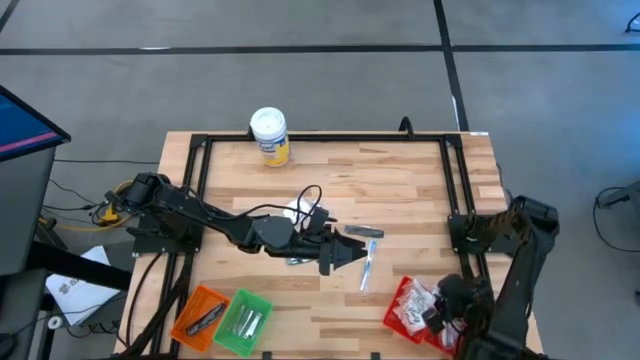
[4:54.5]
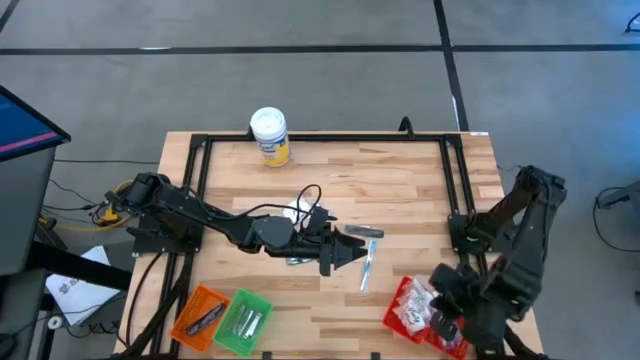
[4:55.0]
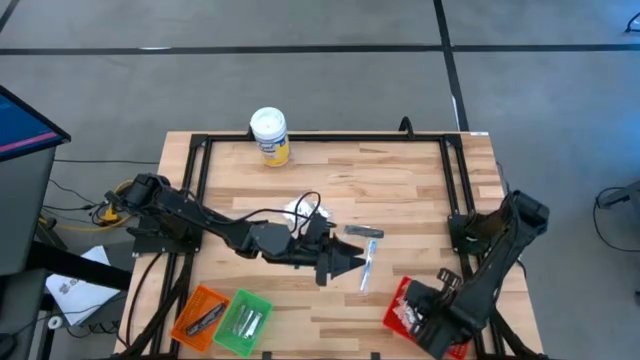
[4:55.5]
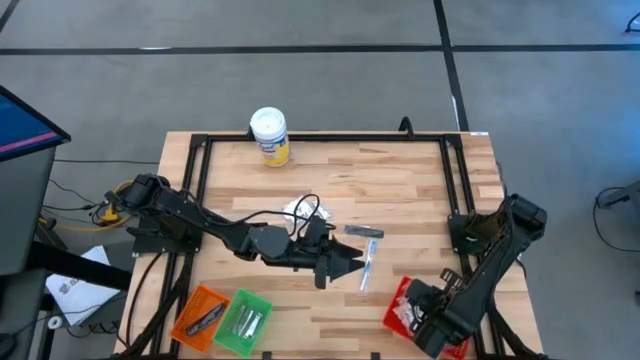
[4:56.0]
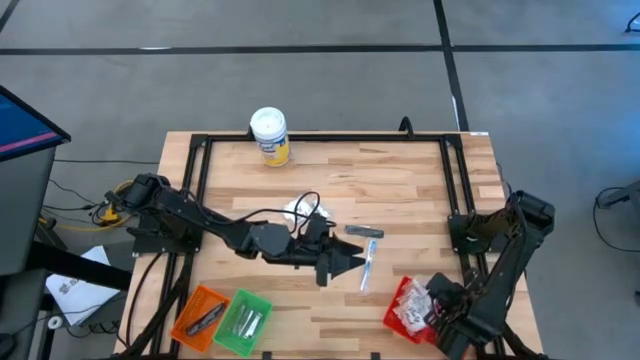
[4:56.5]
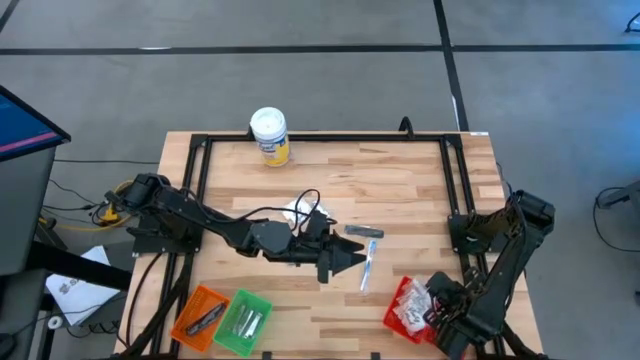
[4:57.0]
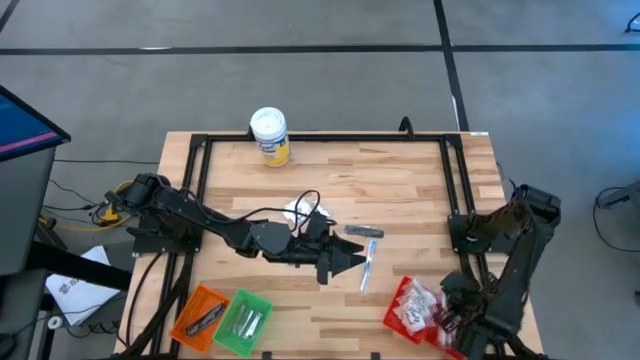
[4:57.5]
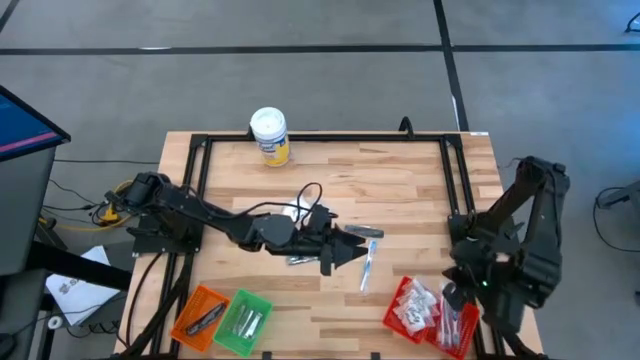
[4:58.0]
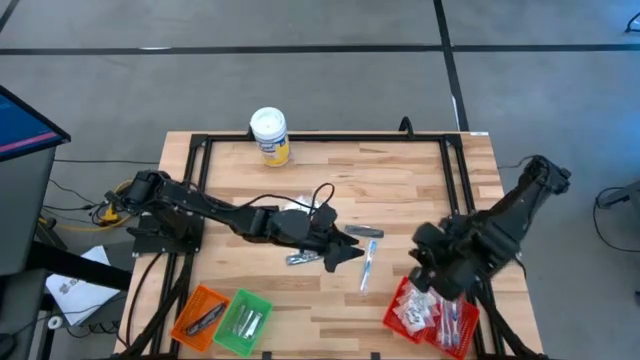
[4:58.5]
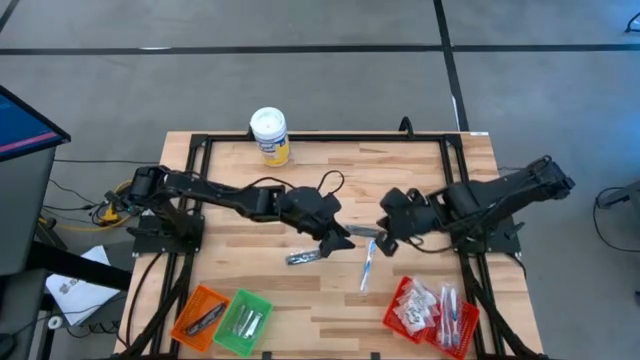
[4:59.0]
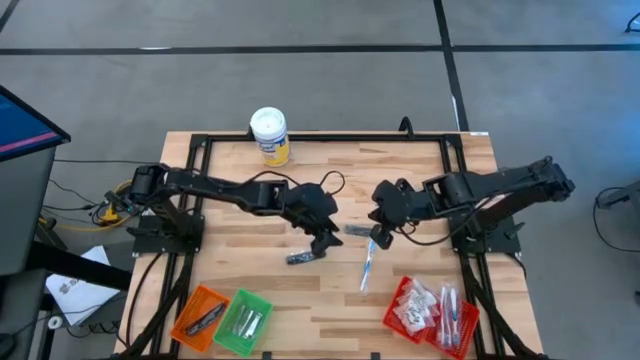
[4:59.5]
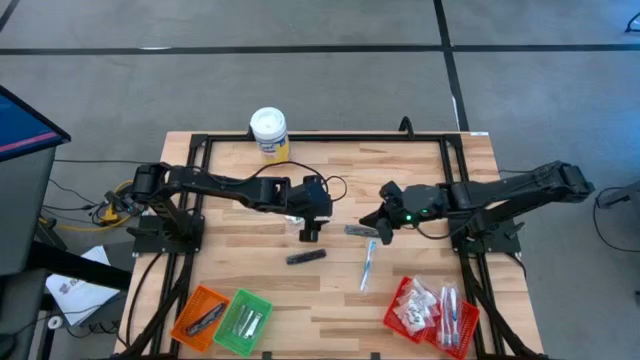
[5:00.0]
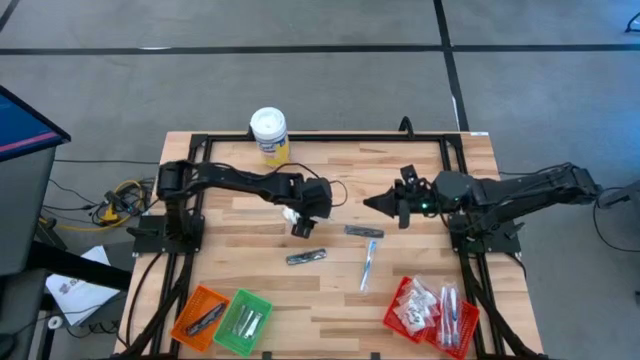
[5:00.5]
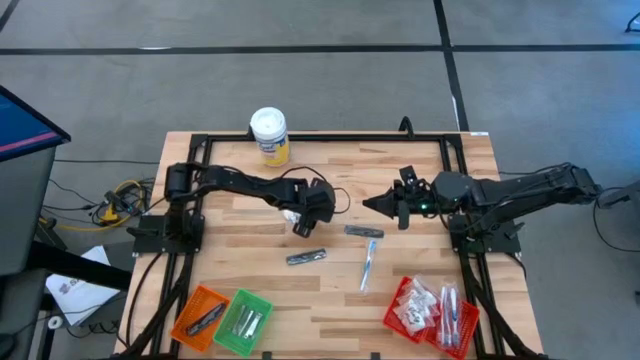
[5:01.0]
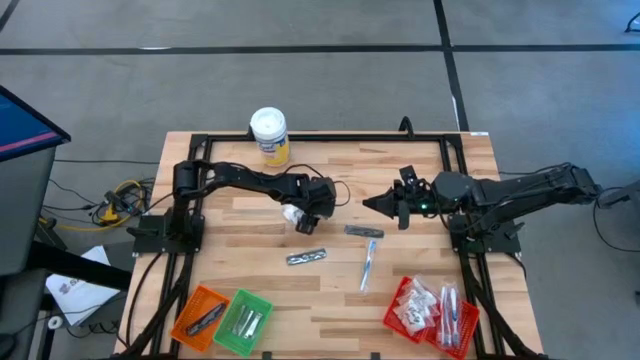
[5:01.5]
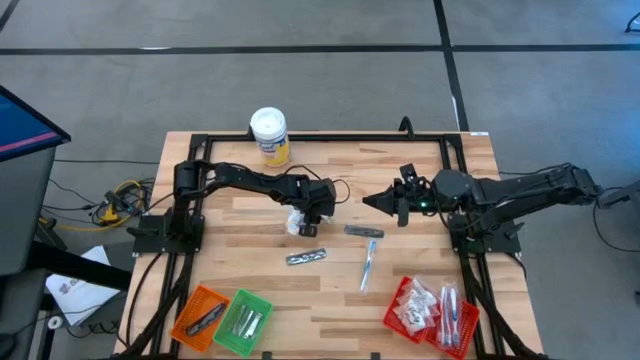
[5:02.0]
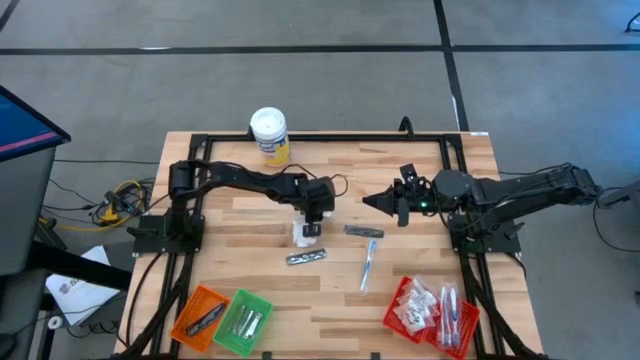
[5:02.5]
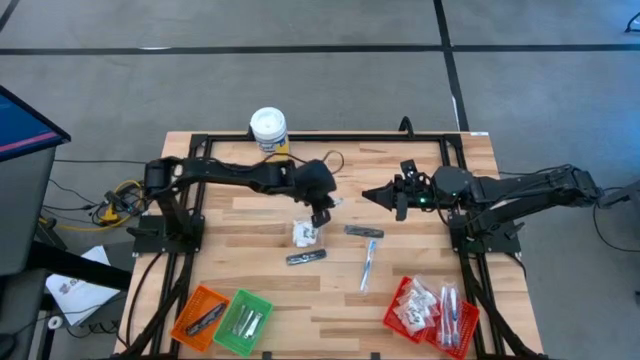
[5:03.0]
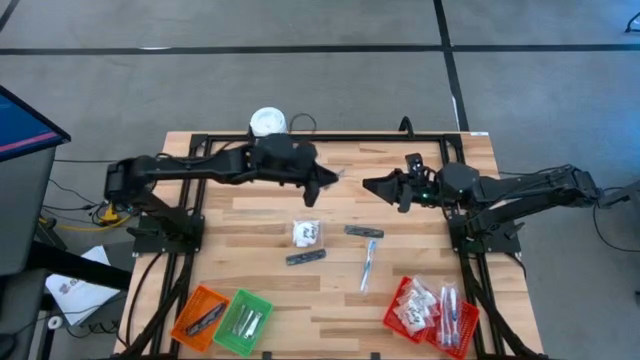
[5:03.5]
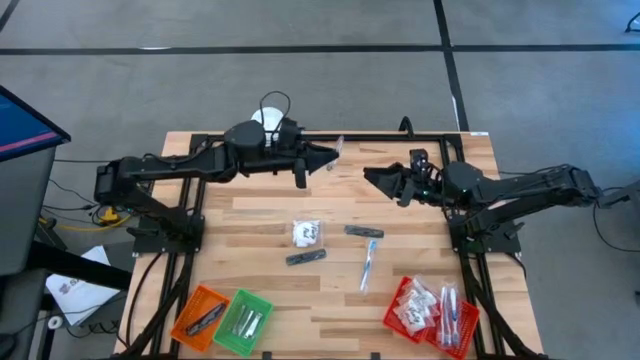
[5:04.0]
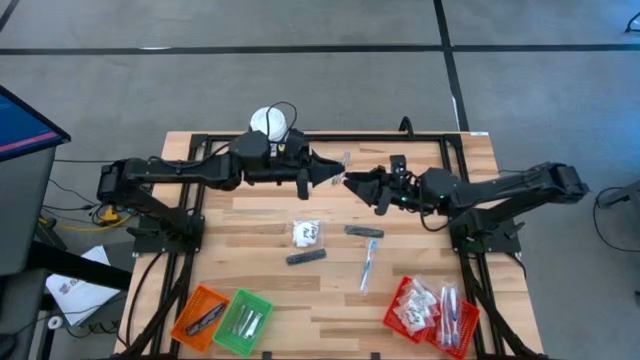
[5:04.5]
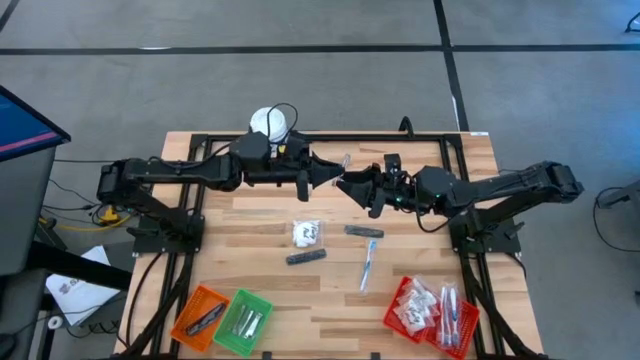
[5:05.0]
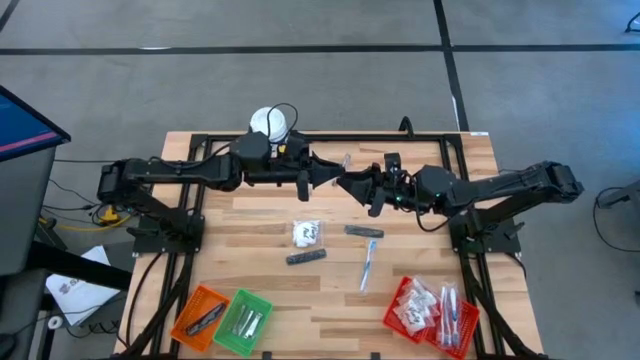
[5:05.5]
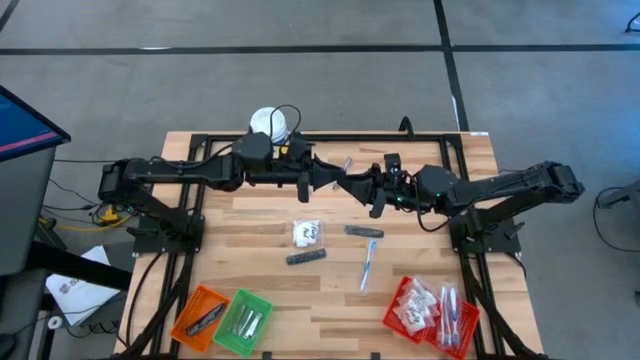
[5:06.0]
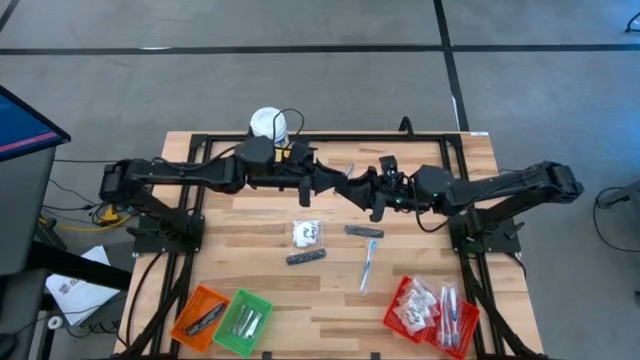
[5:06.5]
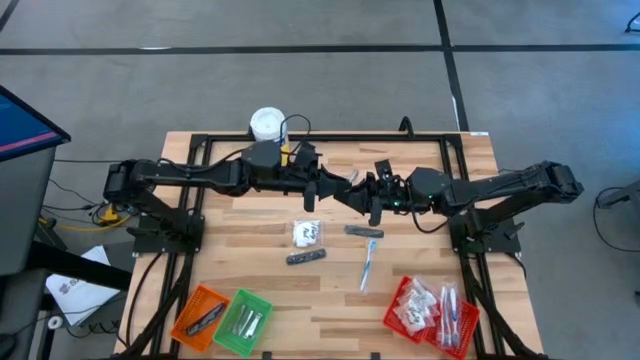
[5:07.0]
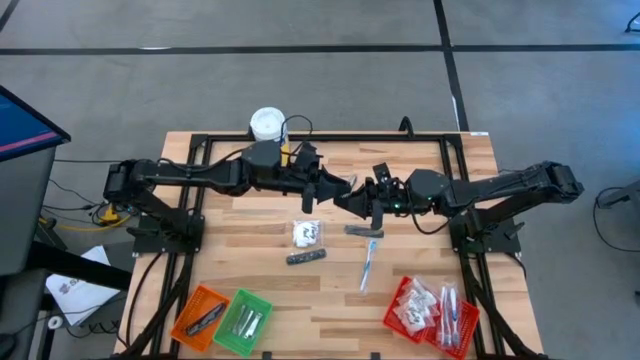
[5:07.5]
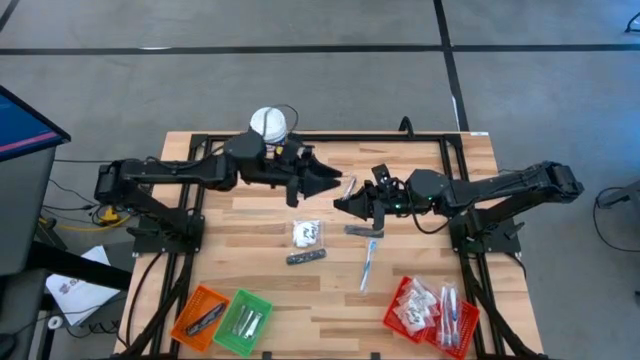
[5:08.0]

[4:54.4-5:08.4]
Task: Pick & Place Travel size toiletries
Put the nail cutter into the green basket

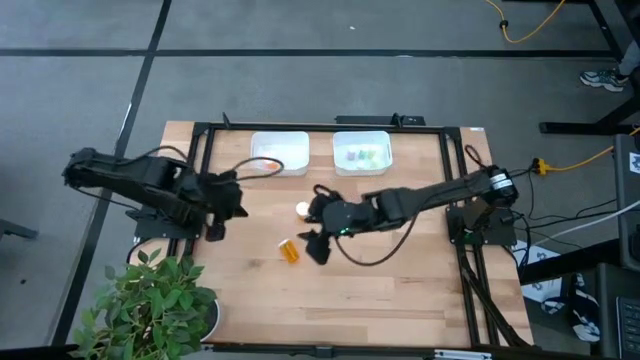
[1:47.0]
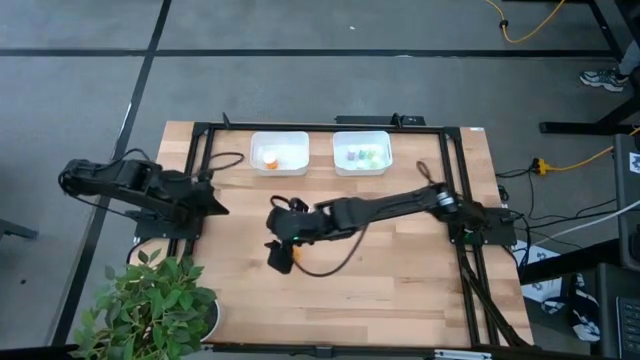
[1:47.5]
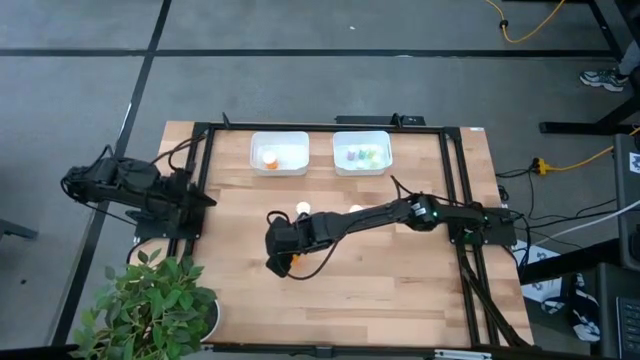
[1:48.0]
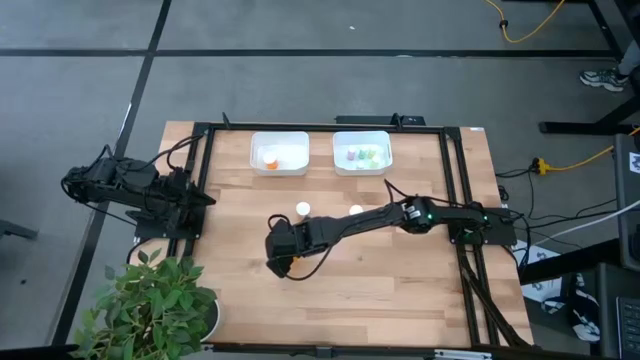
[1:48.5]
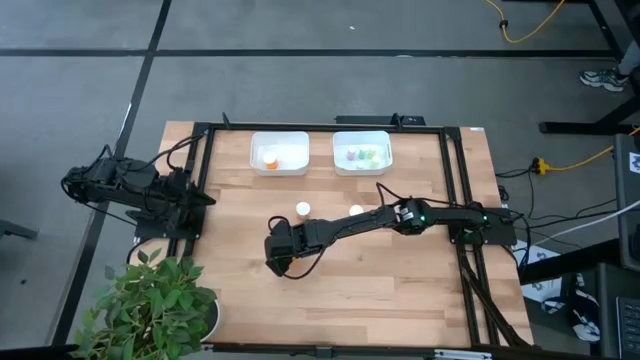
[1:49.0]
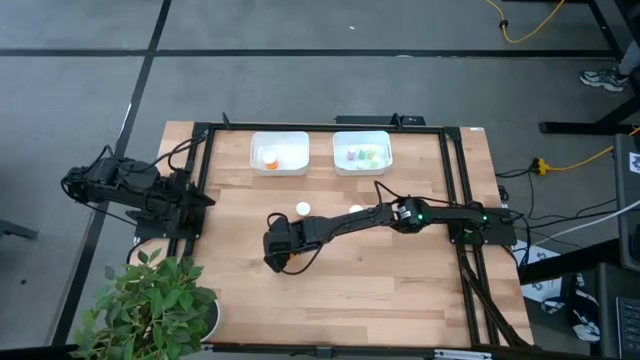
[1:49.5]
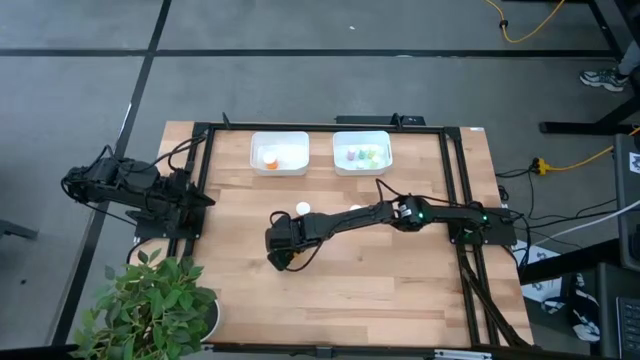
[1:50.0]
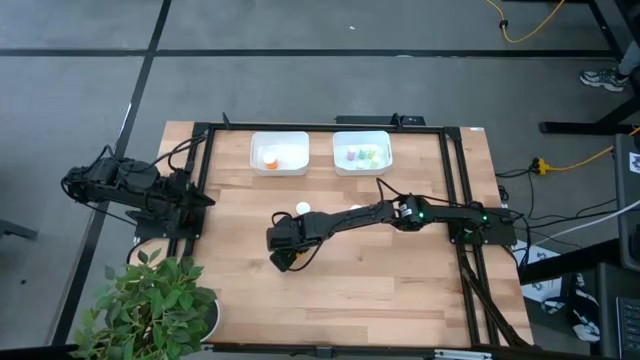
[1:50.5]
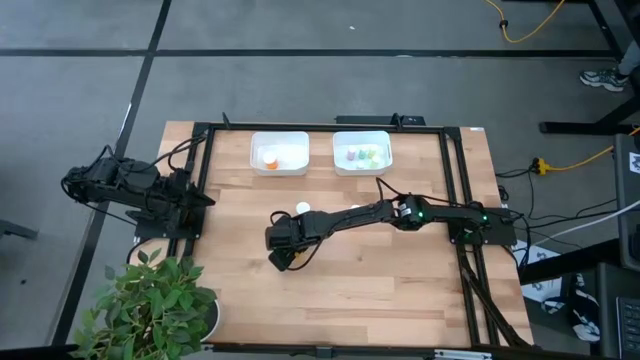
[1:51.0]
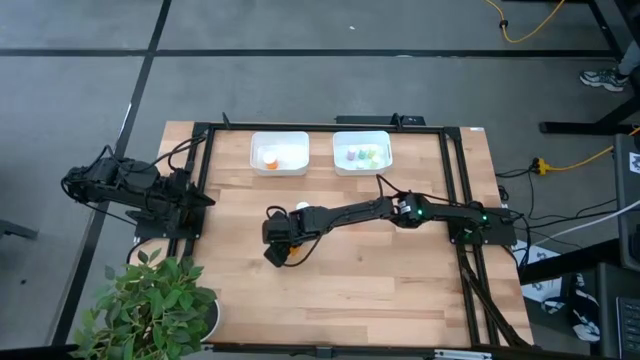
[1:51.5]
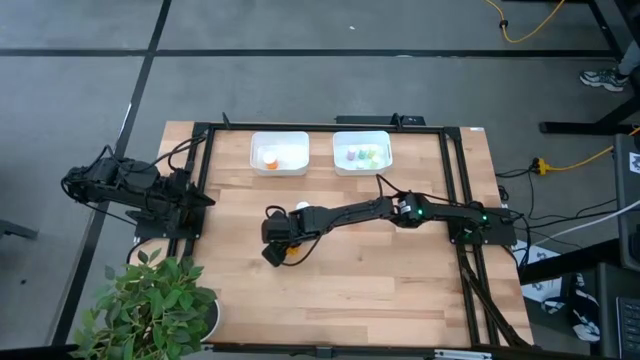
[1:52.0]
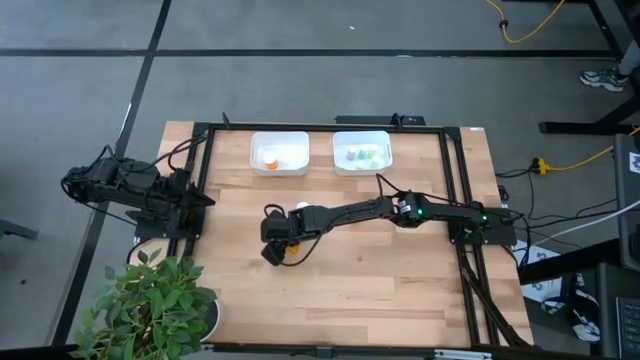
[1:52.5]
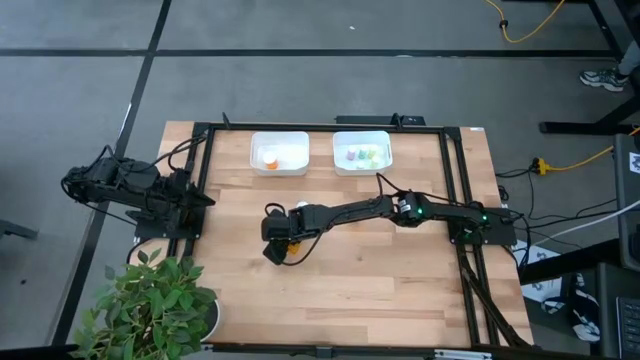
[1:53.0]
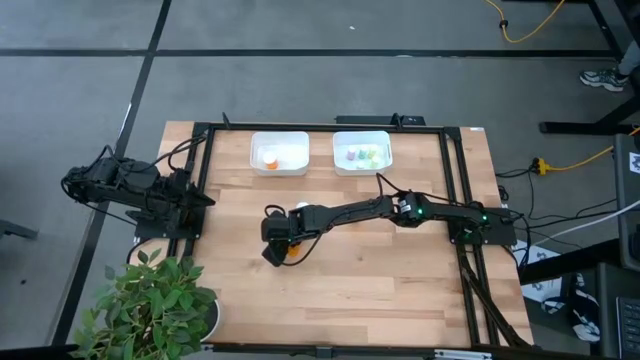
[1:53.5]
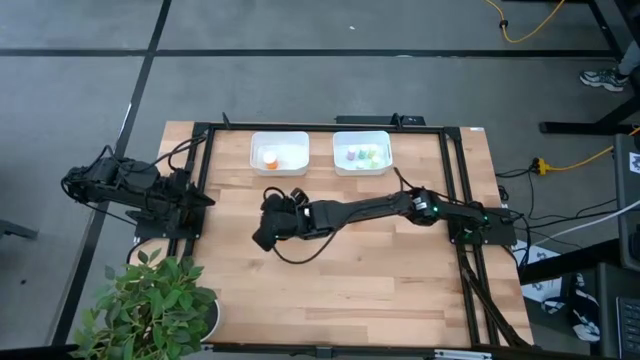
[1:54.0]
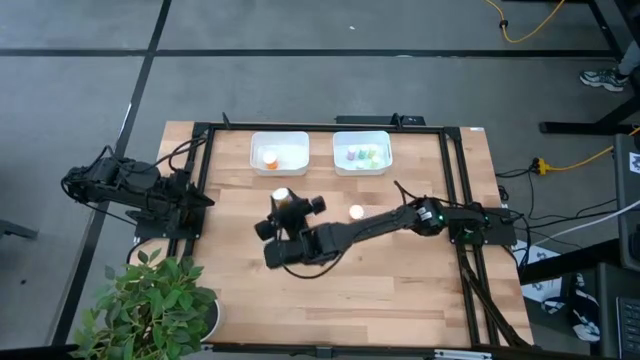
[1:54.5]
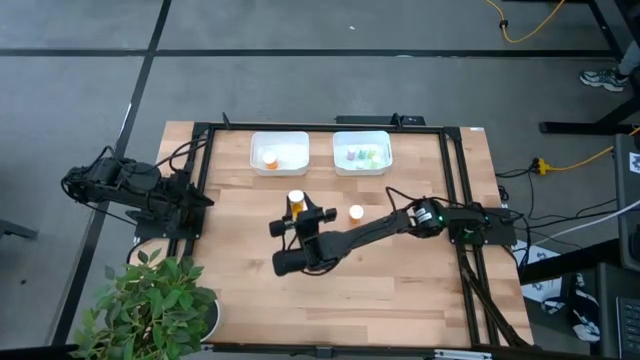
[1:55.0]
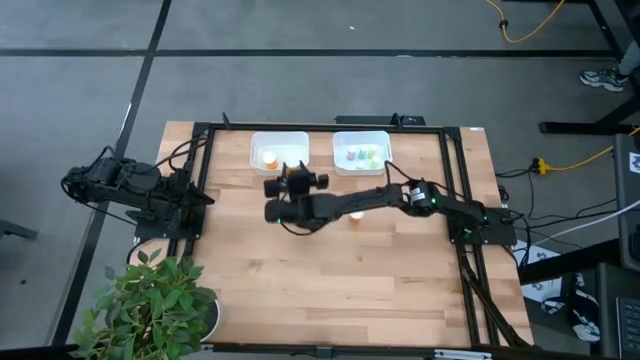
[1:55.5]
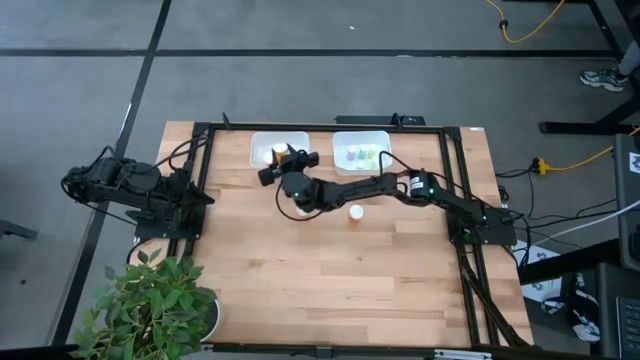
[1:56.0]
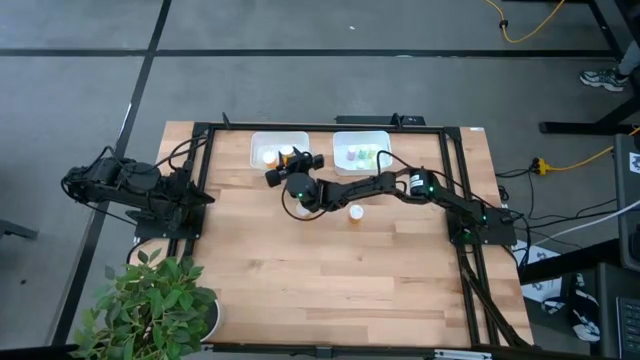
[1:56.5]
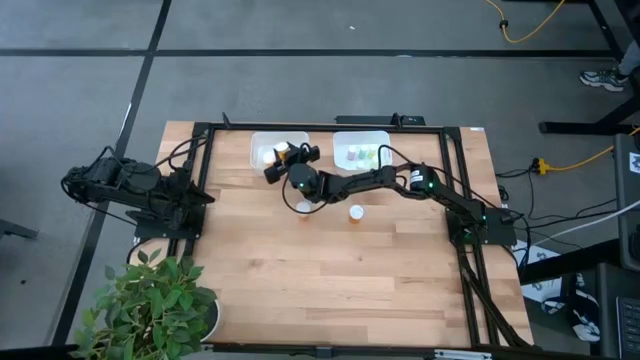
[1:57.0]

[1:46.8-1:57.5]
Task: Pick and place medicine bottles into bin by pill shape (circle, oval)
Put the bottom left large orange pill bottle into the left white bin
